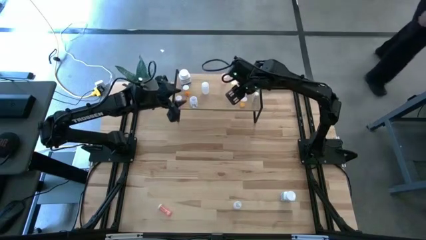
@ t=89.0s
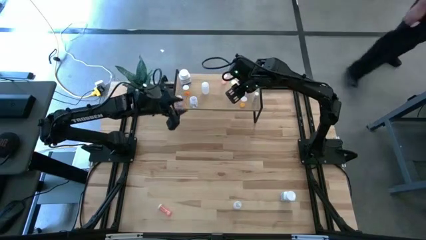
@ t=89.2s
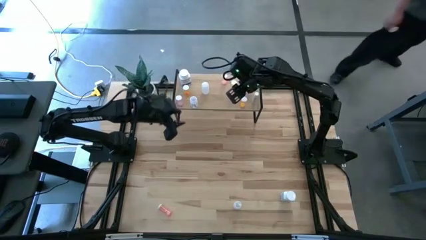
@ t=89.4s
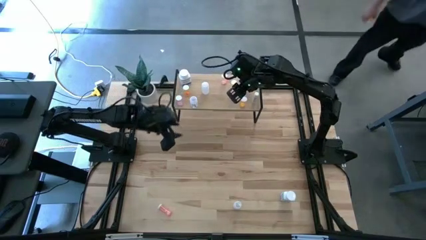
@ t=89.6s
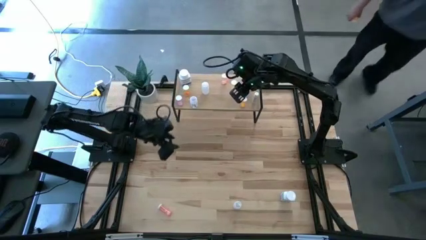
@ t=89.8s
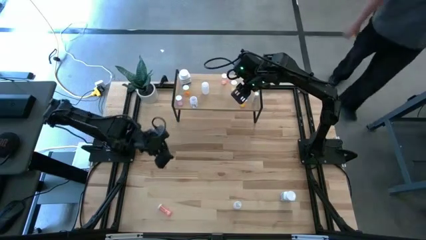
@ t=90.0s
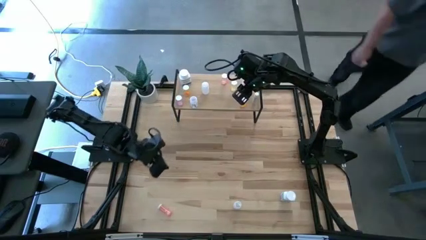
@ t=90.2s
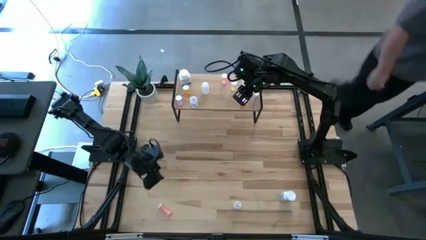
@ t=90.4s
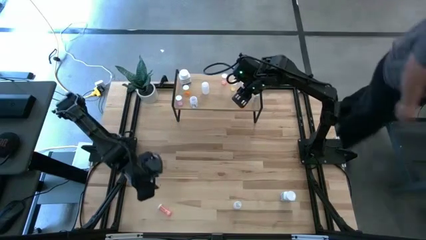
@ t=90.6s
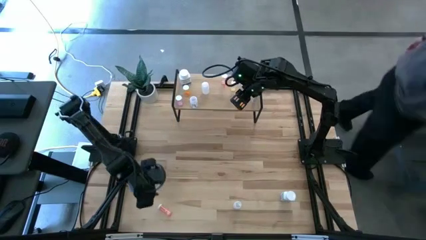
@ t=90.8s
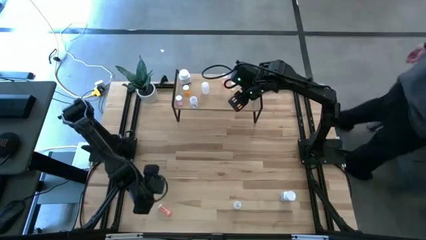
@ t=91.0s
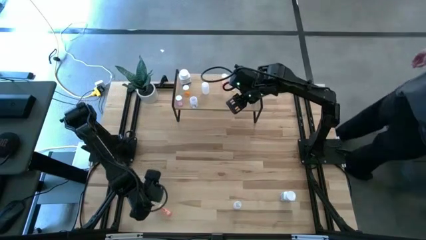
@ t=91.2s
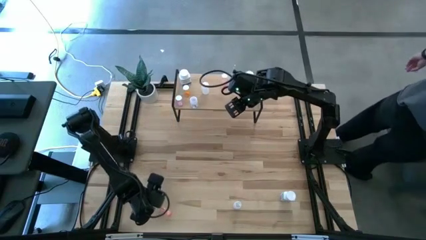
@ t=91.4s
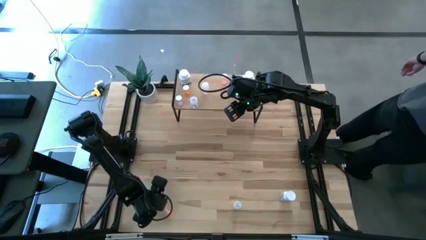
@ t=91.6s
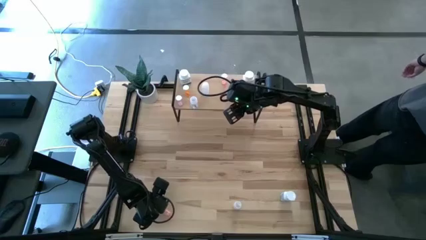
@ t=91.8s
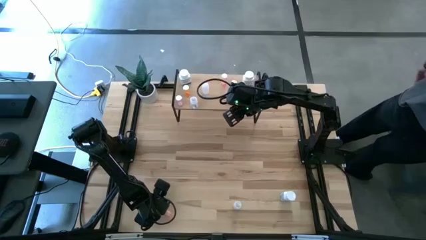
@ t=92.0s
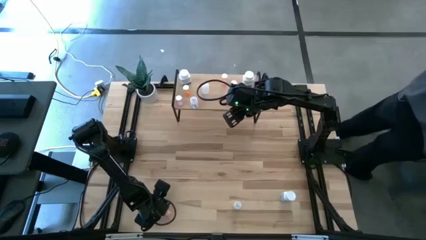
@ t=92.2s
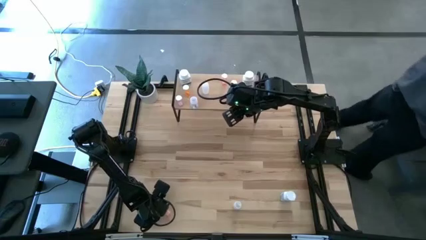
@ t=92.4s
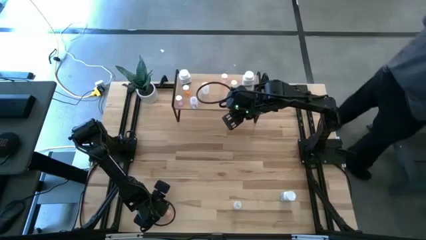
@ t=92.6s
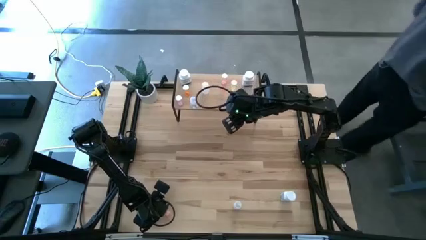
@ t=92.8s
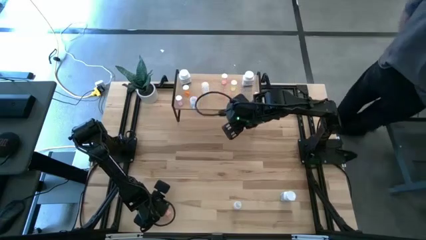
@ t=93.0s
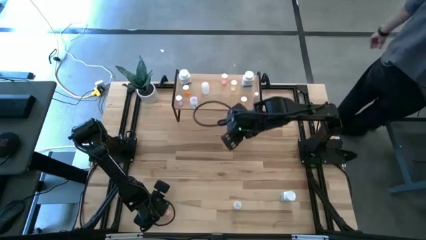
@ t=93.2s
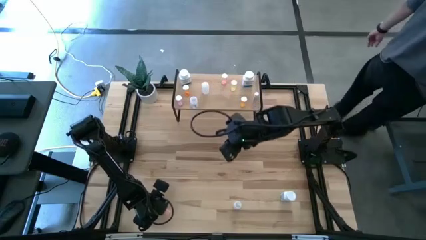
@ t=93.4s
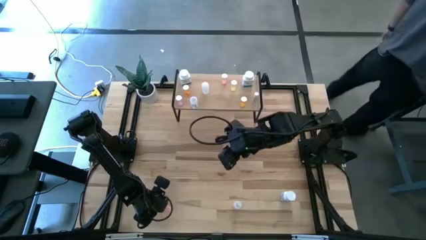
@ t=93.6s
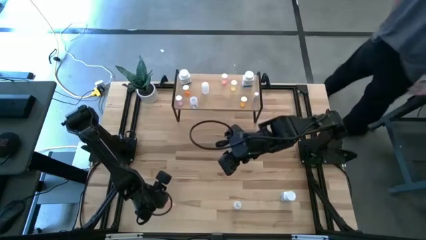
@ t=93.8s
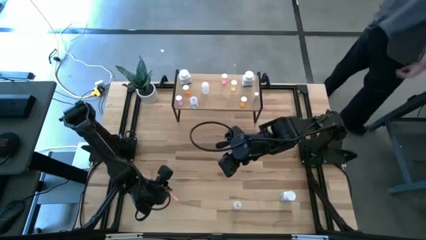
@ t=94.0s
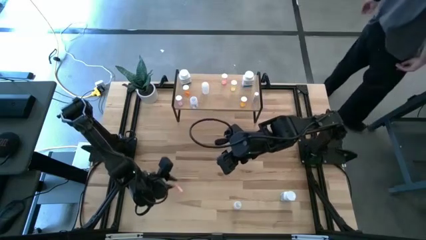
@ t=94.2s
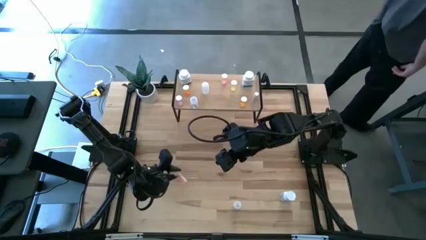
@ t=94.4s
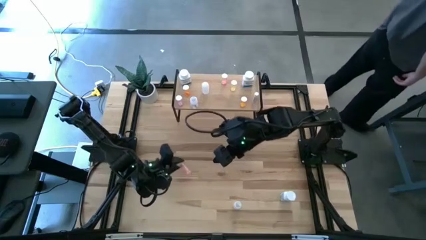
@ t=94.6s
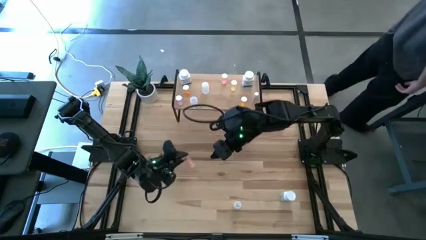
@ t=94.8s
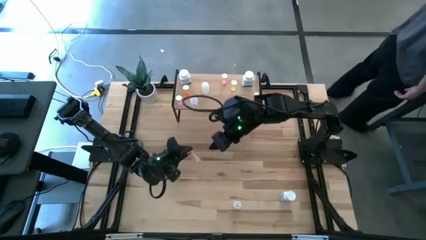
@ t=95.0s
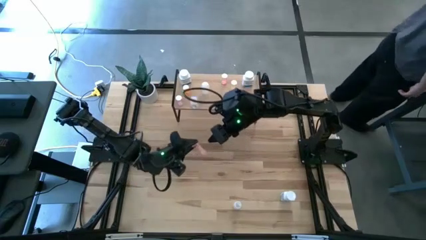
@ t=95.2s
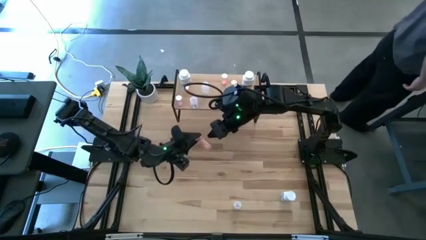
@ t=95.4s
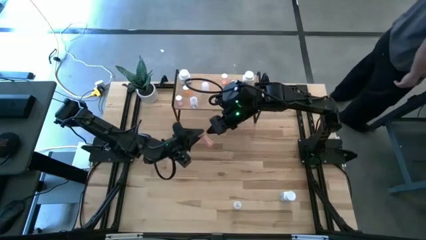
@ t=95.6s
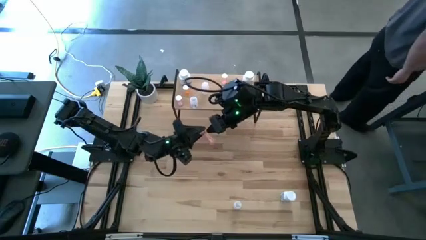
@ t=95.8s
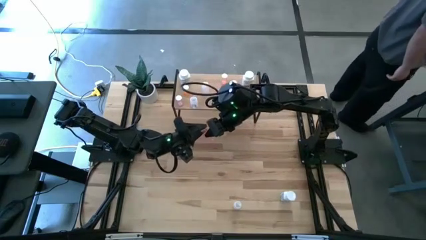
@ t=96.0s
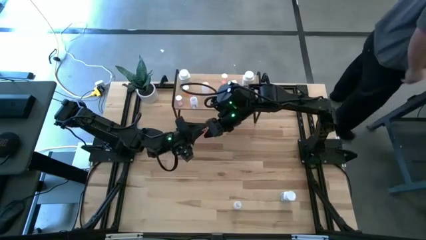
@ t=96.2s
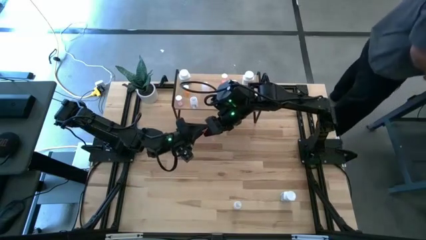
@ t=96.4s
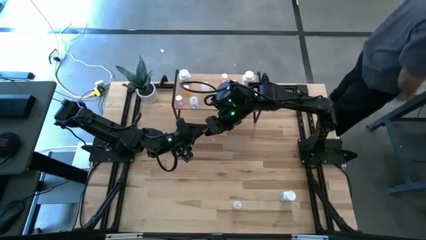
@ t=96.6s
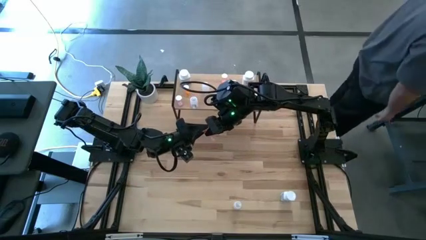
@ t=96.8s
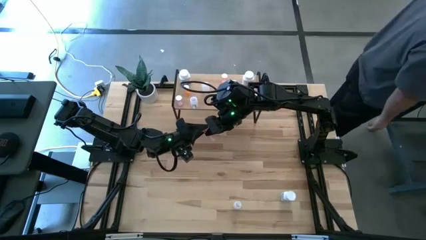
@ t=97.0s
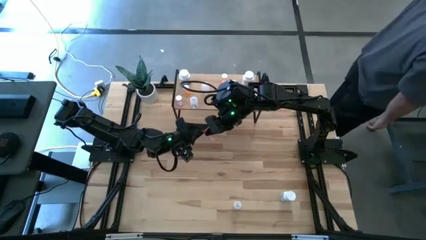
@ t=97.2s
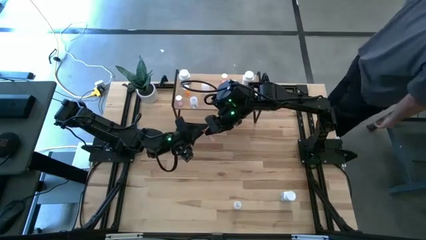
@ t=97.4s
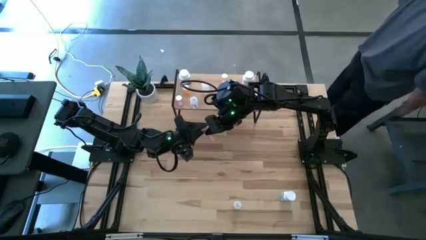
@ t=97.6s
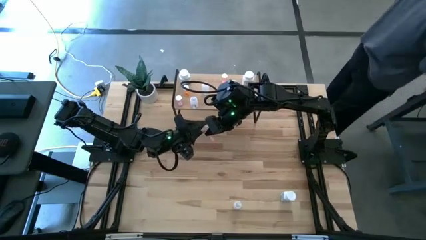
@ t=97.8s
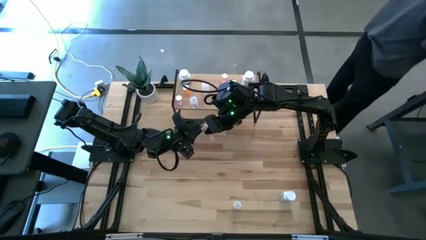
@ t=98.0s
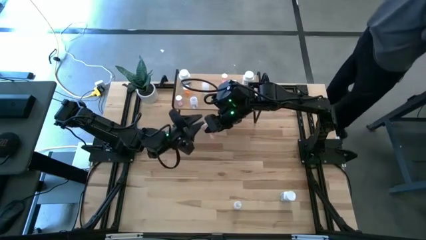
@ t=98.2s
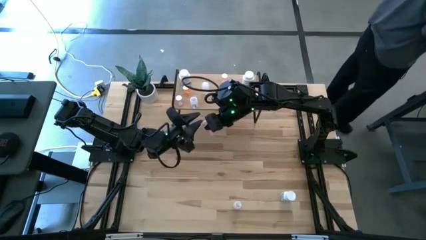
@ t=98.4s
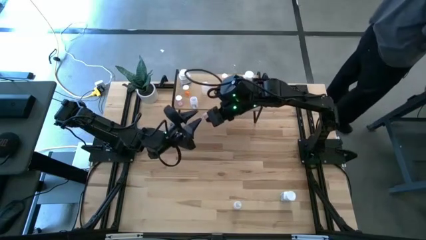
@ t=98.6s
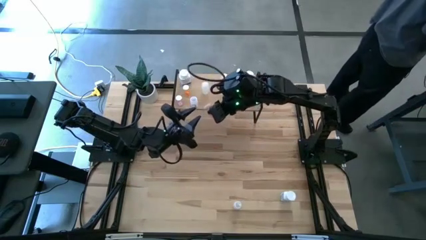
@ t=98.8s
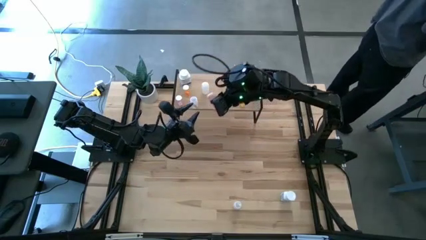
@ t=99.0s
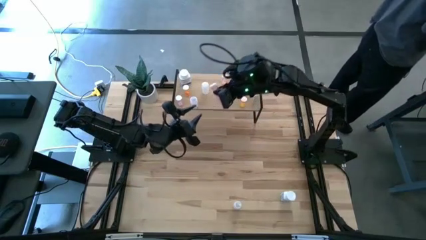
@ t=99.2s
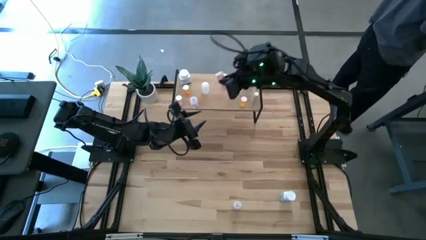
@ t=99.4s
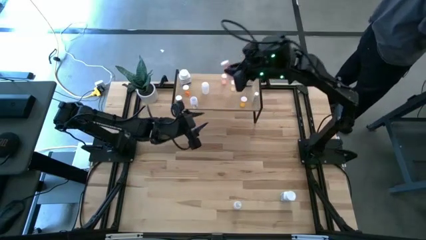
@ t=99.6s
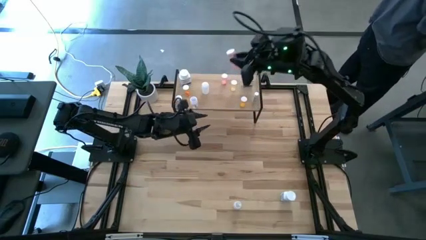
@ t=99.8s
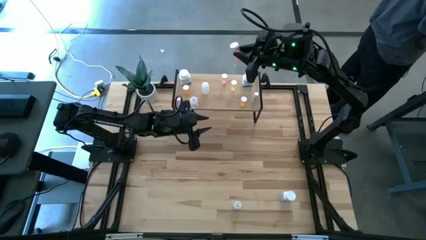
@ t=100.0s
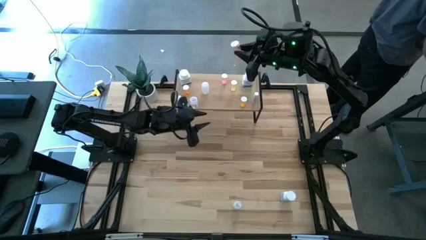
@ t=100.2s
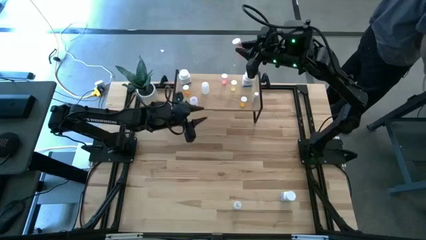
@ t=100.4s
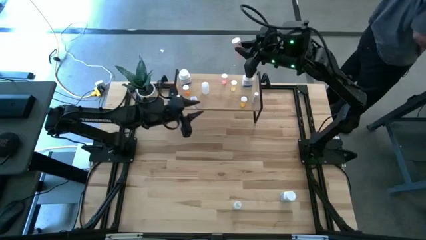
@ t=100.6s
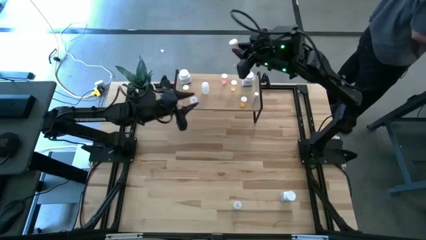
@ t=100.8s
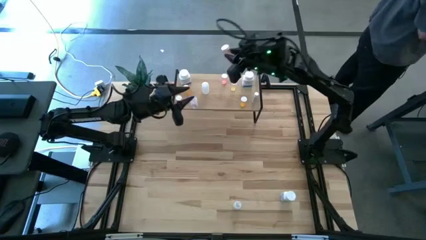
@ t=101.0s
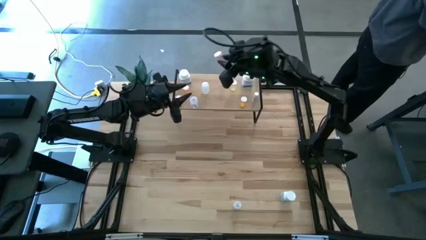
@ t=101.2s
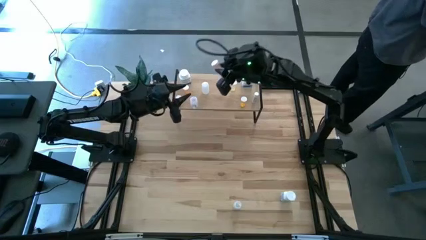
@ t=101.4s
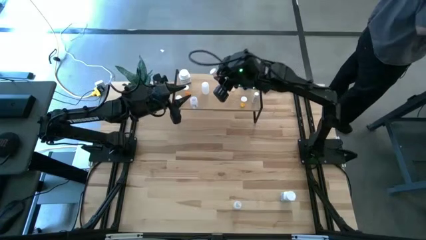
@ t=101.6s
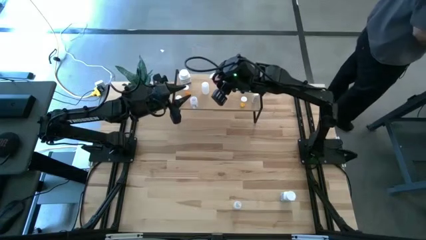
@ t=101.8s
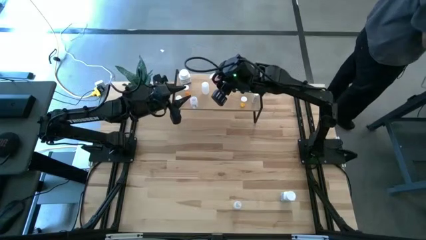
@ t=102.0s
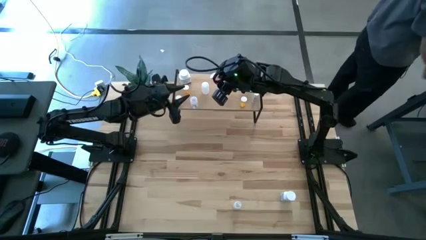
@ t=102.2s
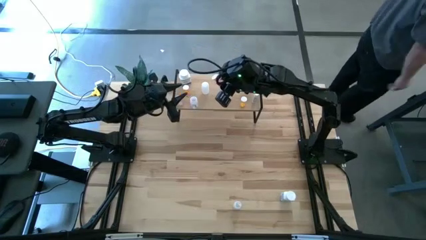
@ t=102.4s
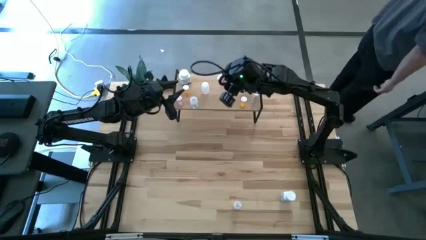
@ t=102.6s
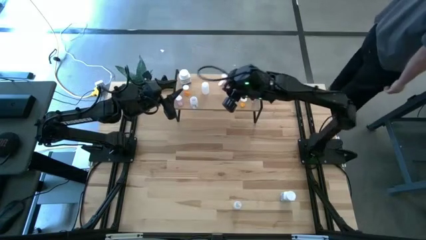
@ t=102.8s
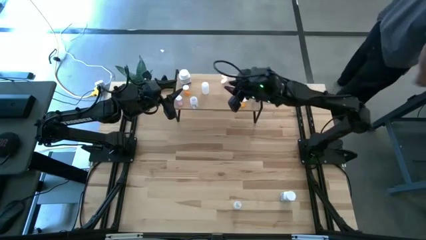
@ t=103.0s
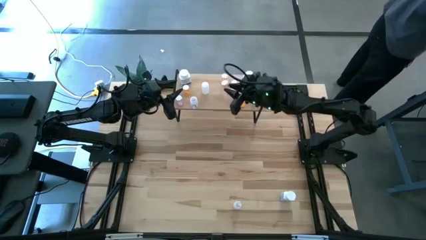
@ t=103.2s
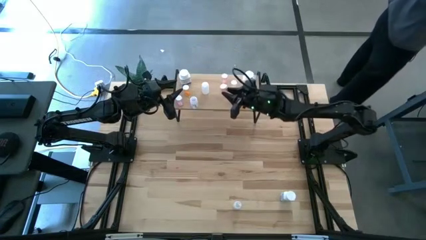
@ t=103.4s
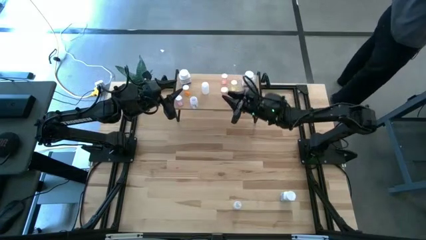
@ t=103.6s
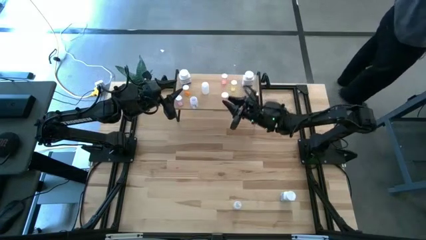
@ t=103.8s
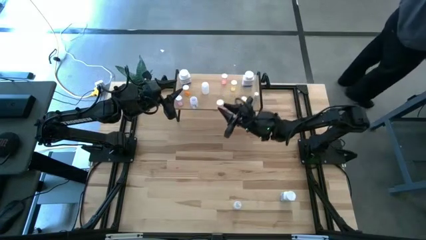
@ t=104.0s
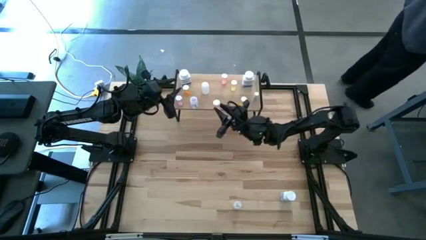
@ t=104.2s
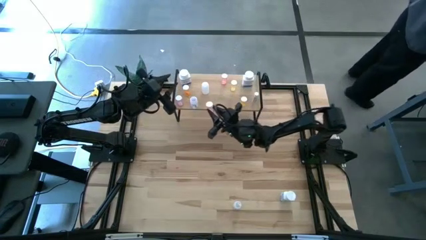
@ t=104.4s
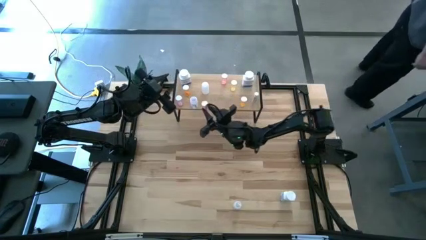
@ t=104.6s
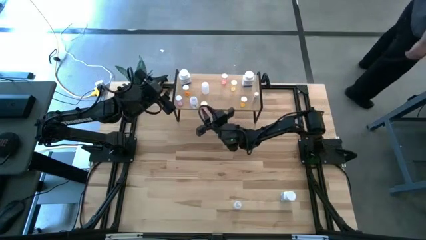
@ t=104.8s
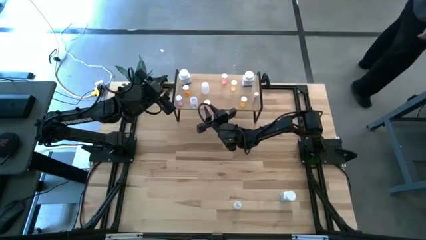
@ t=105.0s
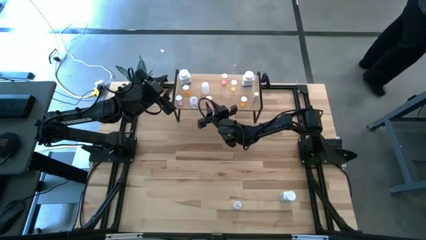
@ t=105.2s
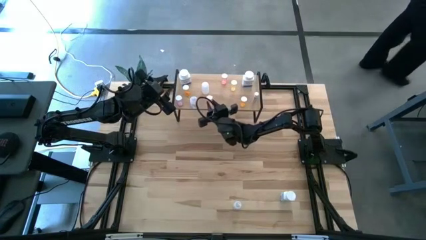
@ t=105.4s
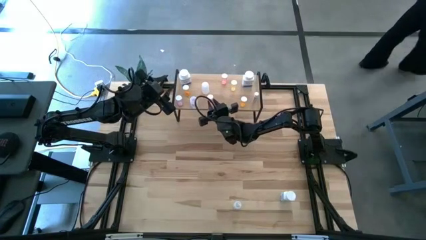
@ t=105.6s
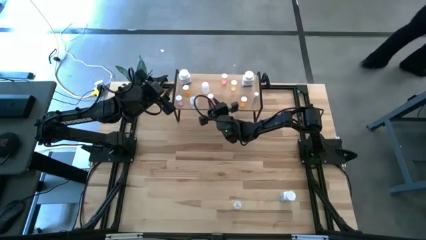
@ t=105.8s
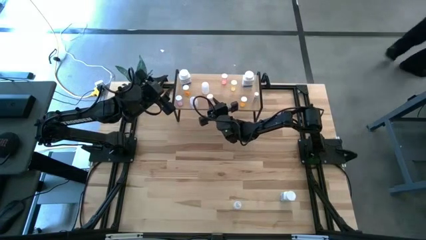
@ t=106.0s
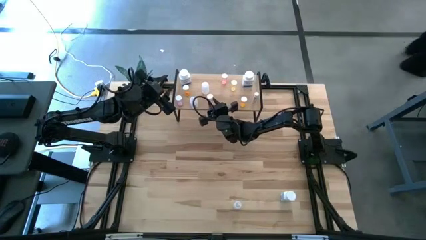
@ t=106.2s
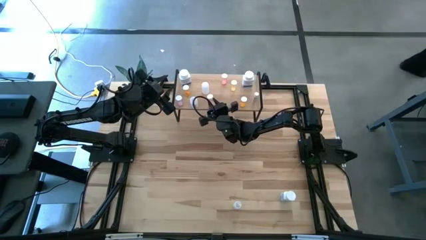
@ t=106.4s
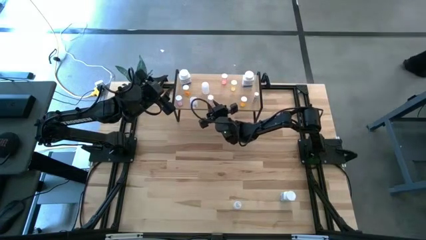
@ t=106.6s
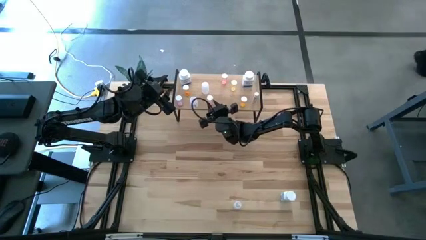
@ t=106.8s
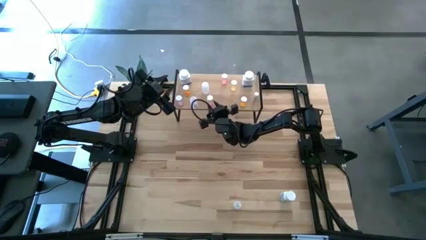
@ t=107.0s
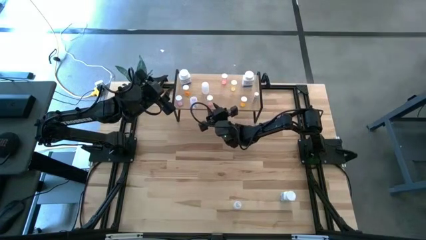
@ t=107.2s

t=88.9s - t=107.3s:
Task: Pick and place medicine bottles onto shelf by color
Put the pink transparent pill bottle on the shelf
